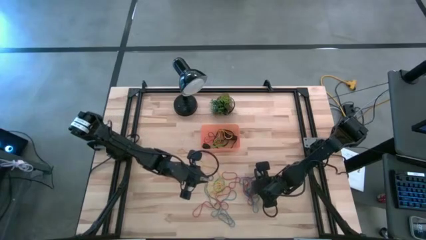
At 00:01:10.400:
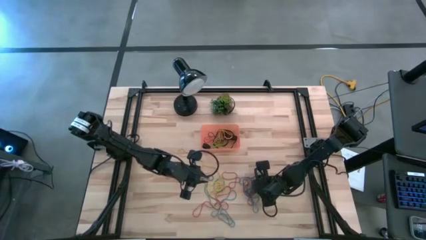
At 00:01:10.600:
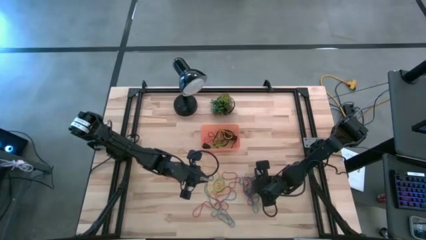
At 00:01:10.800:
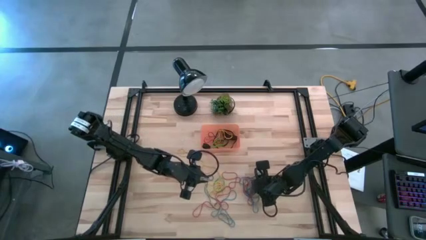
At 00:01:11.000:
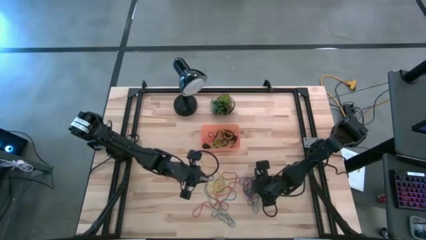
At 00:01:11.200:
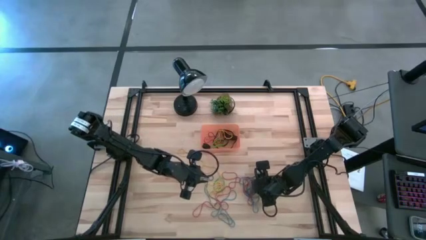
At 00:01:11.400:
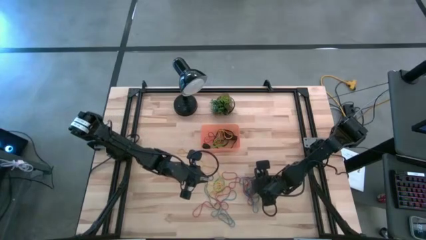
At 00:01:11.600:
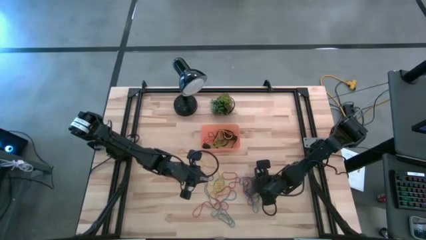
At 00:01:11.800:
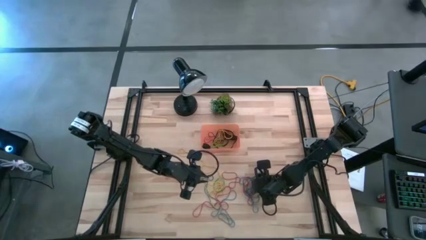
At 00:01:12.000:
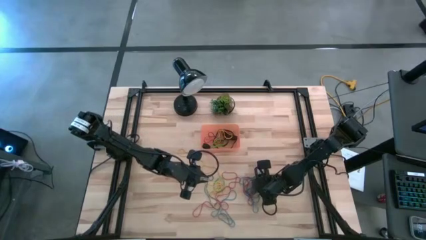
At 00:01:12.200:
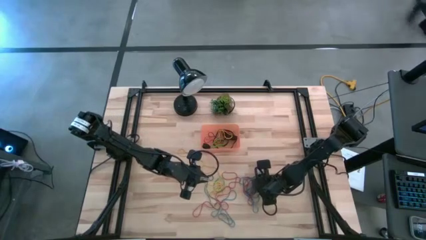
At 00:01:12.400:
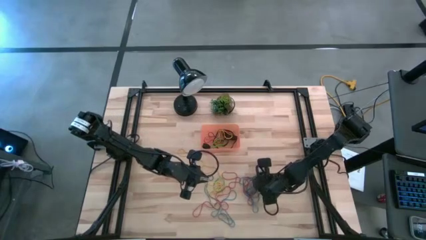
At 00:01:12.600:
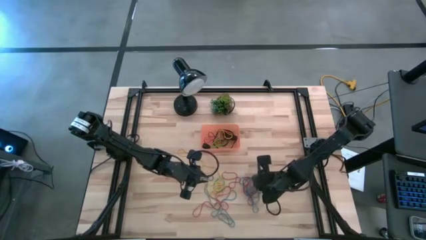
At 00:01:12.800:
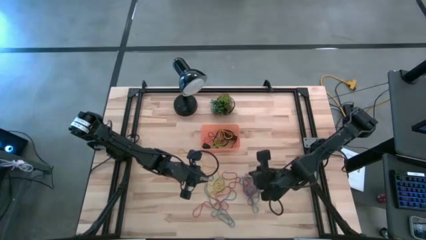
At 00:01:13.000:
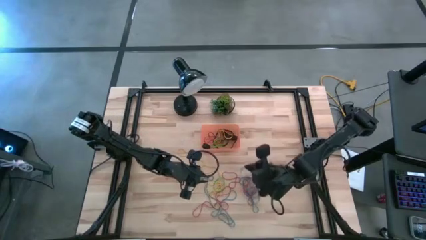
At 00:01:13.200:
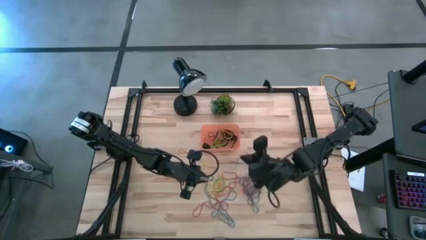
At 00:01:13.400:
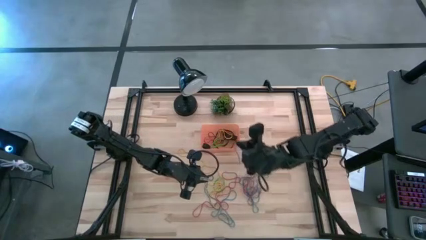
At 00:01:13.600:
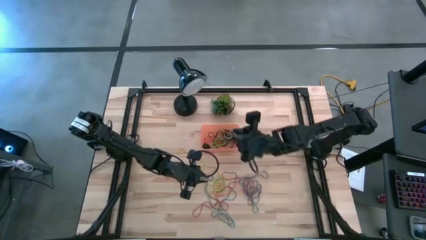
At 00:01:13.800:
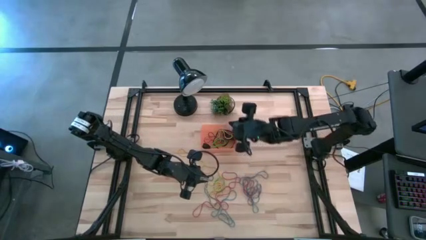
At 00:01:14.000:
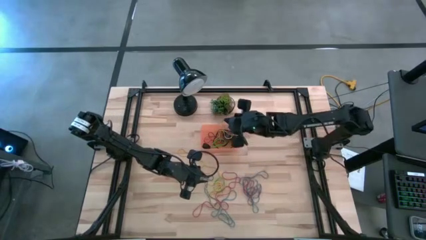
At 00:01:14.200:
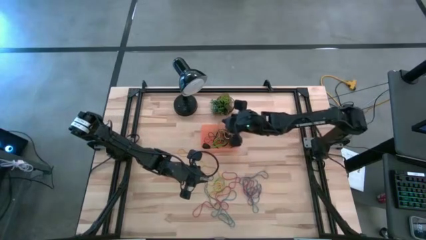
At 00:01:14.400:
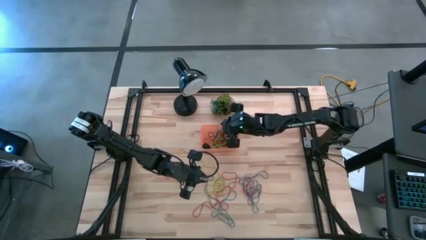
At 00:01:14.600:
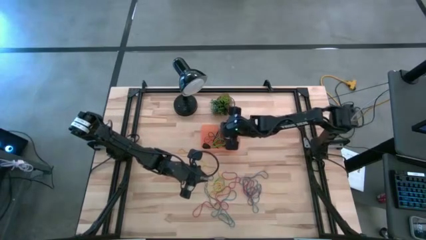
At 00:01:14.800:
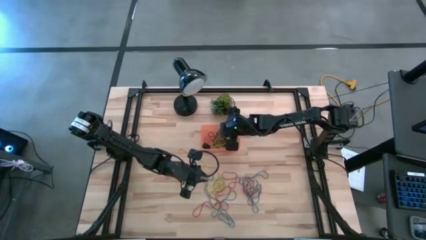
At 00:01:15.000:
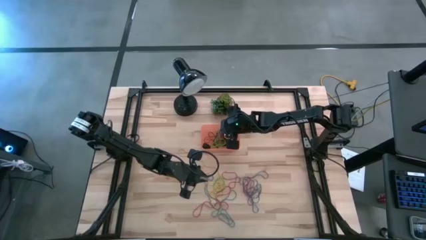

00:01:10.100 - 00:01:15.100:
Task: Pick and place rubber bands into bin
Put the blue rubber band into the orange bin

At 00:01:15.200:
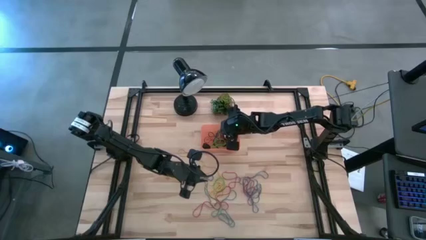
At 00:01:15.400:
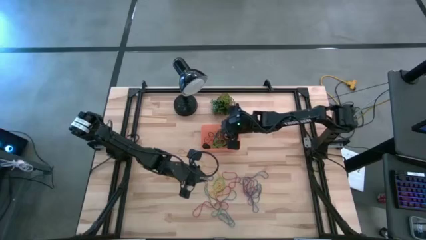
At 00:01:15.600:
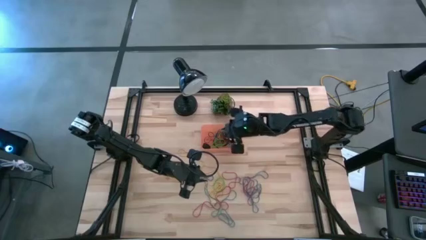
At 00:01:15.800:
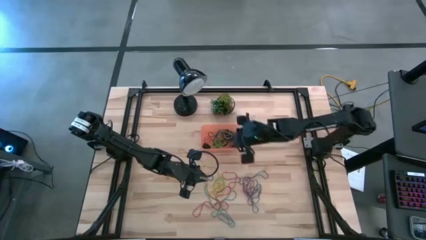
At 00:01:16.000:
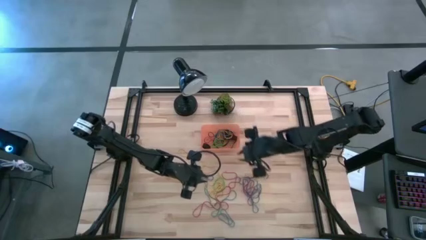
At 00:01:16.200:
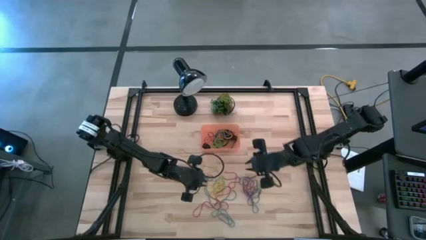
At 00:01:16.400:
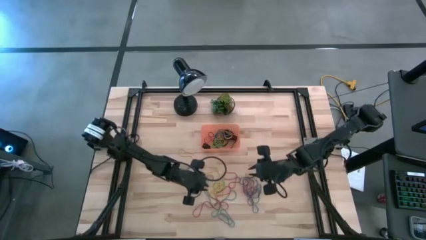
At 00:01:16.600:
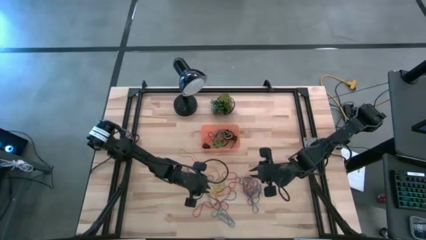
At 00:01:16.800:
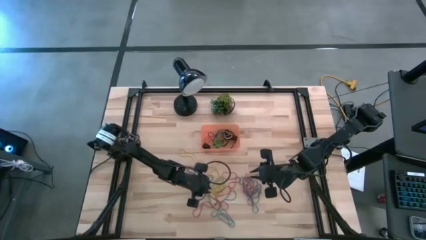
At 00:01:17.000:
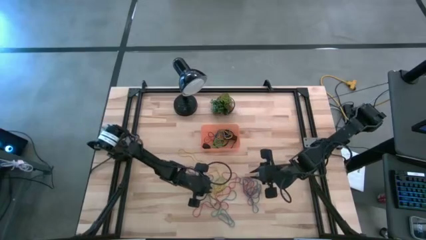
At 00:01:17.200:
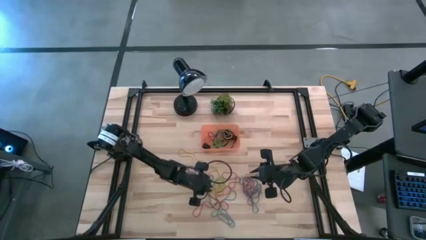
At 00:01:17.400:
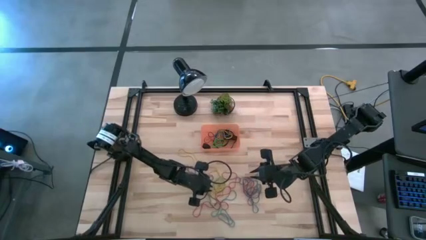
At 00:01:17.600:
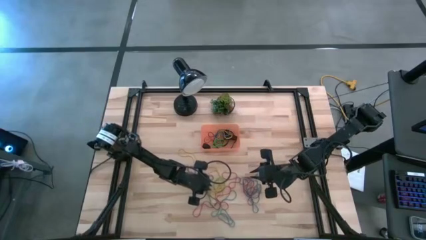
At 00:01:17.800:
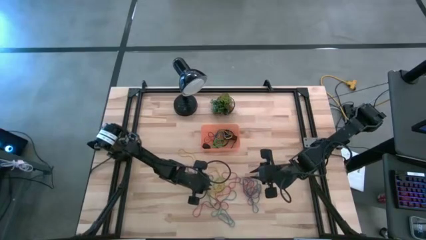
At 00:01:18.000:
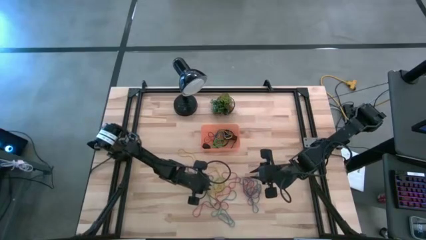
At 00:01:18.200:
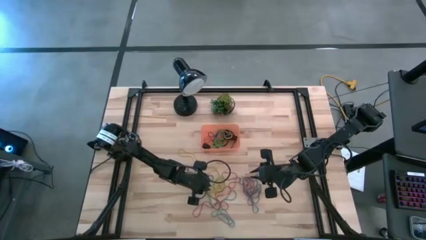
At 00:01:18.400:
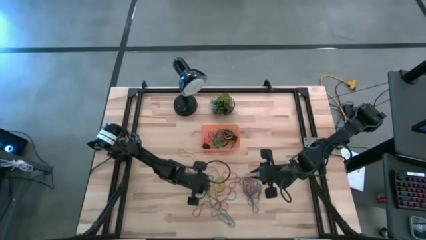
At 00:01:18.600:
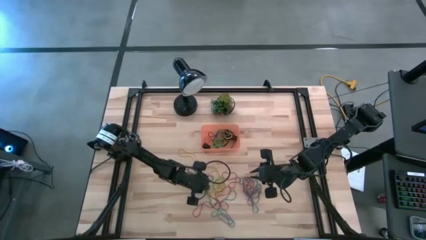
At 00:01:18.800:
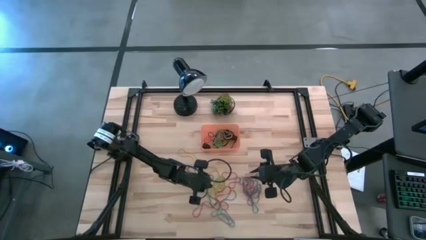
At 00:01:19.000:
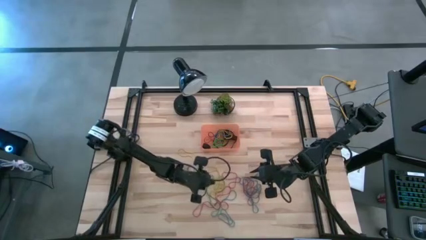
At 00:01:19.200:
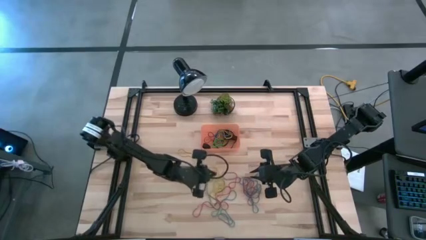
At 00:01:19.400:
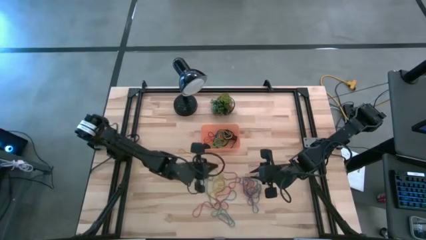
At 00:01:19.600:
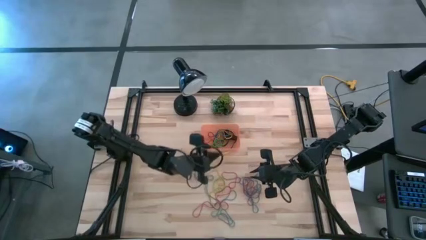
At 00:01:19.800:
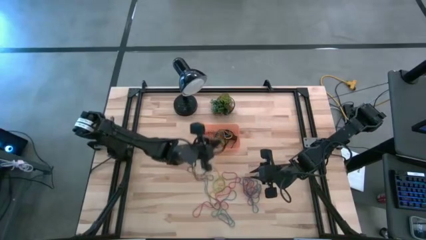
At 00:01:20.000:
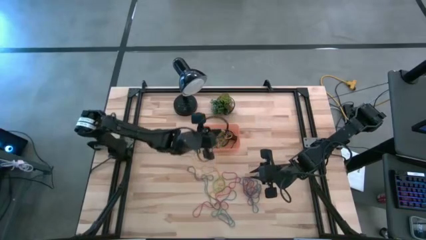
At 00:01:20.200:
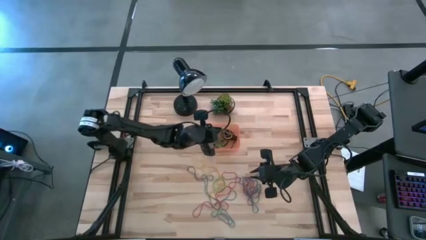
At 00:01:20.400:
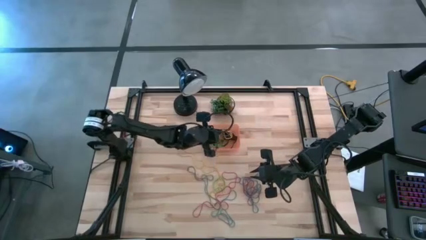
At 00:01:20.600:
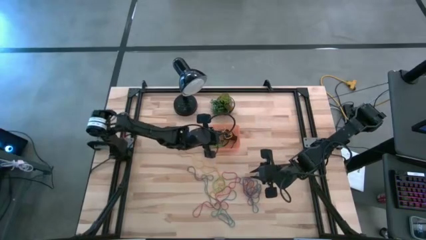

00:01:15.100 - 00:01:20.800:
Put the yellow rubber band into the orange bin

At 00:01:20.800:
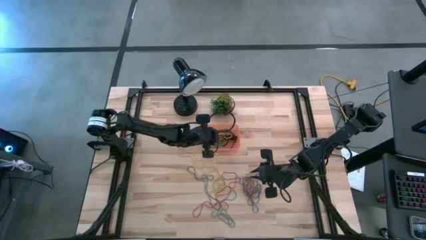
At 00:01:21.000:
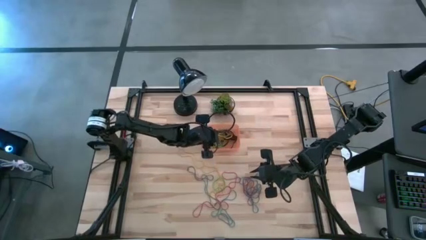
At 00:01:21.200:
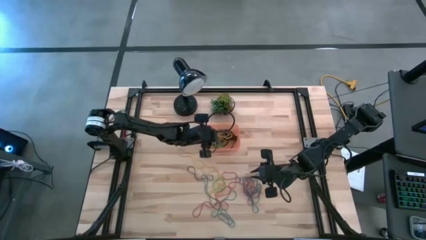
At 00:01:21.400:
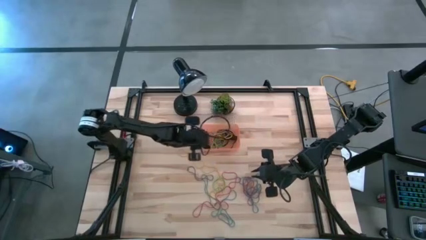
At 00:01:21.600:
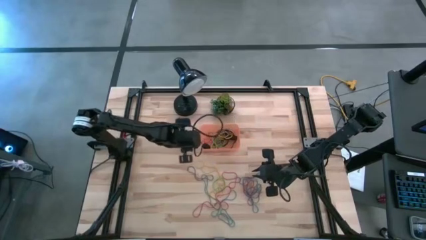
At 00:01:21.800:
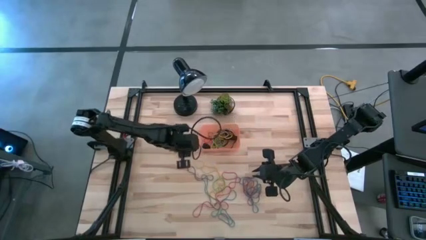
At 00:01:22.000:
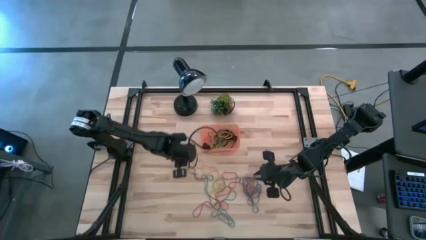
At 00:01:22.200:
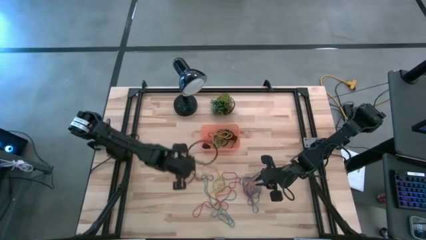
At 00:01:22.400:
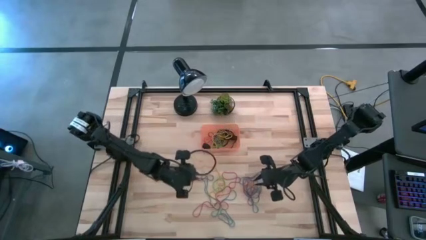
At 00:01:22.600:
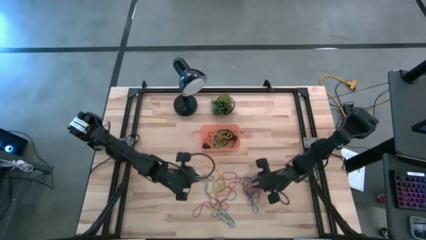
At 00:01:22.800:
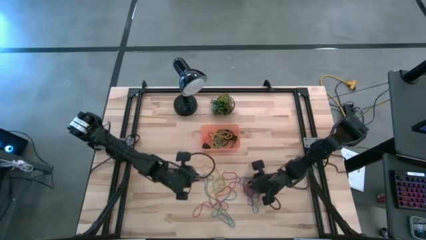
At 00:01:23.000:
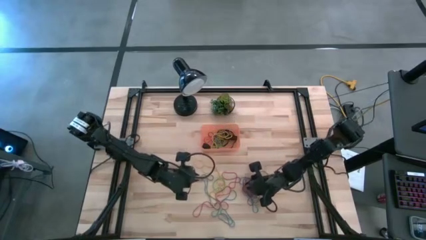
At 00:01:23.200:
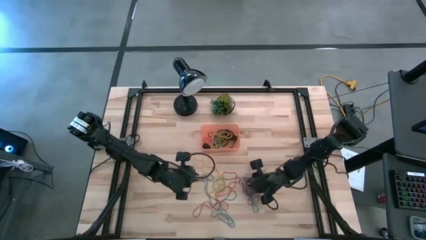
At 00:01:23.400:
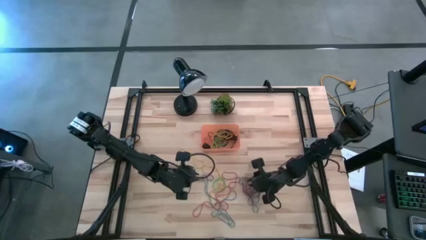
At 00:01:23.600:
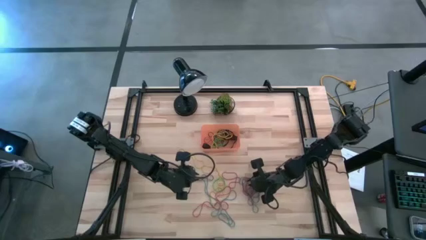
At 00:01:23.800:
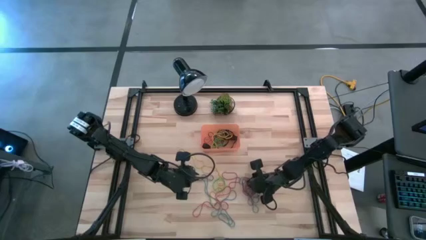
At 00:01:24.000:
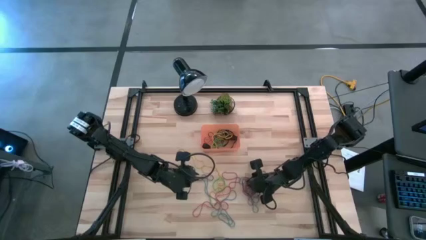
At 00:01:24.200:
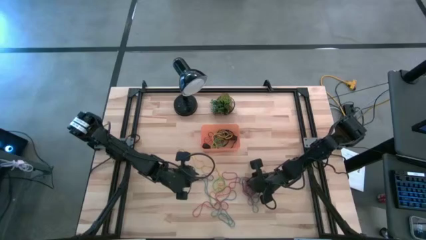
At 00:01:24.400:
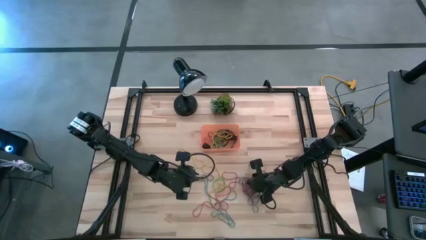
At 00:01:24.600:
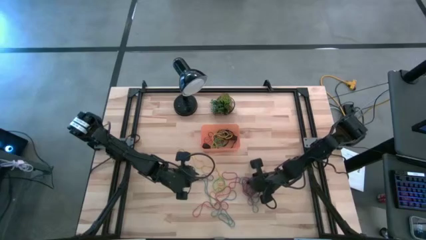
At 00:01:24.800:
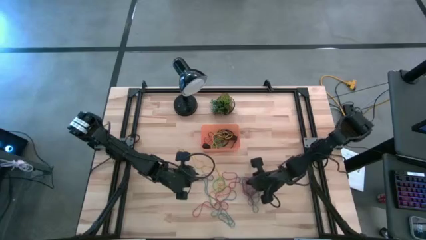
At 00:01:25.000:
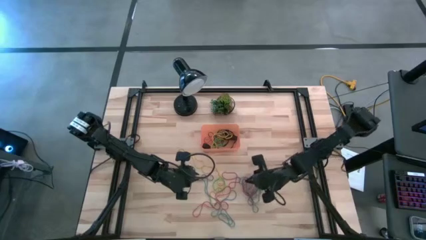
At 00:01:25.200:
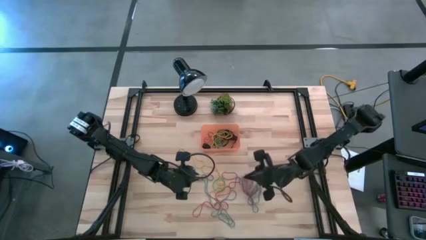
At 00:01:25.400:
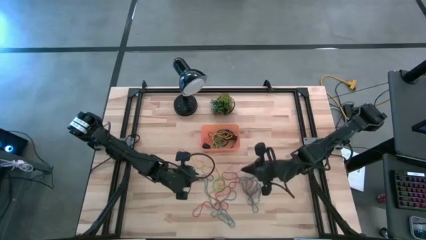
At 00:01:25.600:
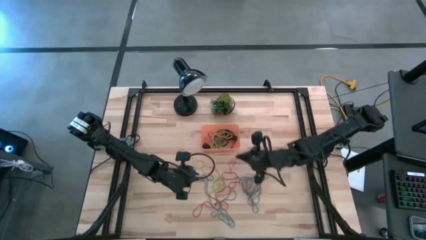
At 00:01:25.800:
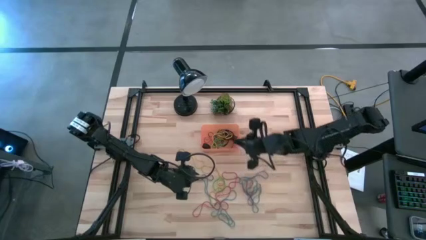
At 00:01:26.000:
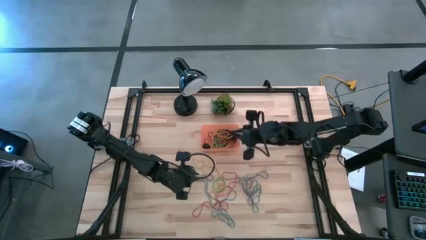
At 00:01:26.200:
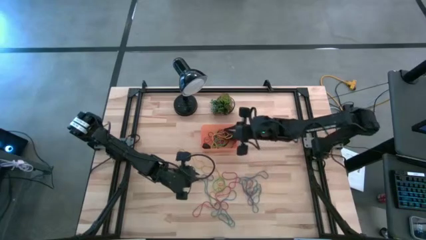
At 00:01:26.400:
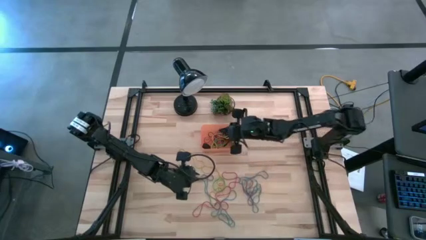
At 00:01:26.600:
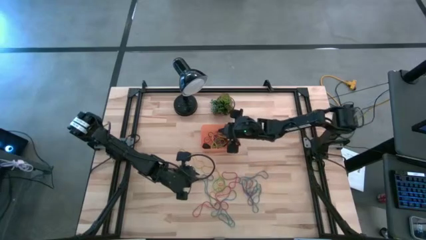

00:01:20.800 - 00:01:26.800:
Put the red rubber band into the orange bin
